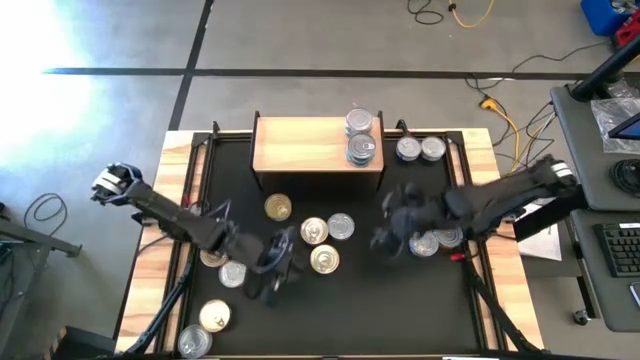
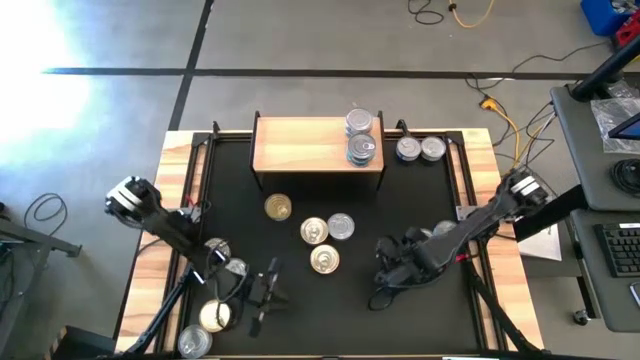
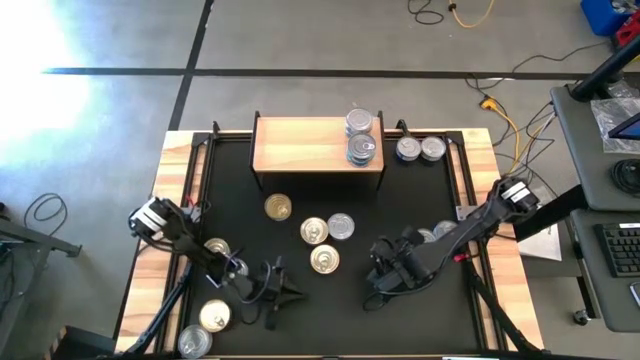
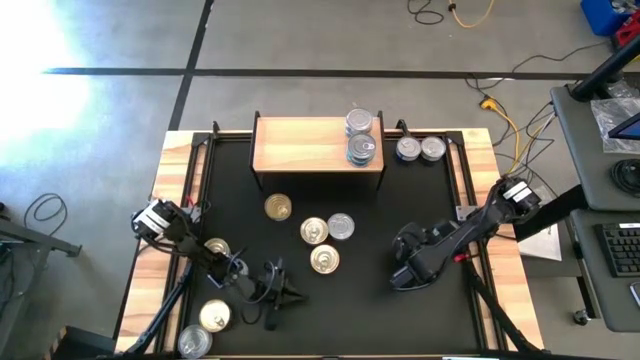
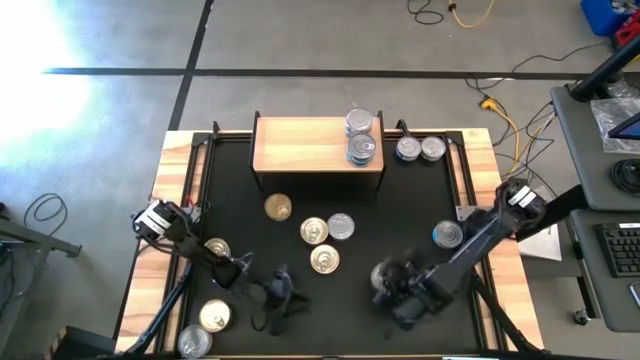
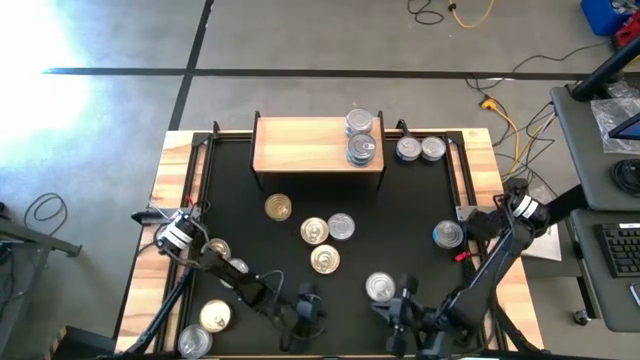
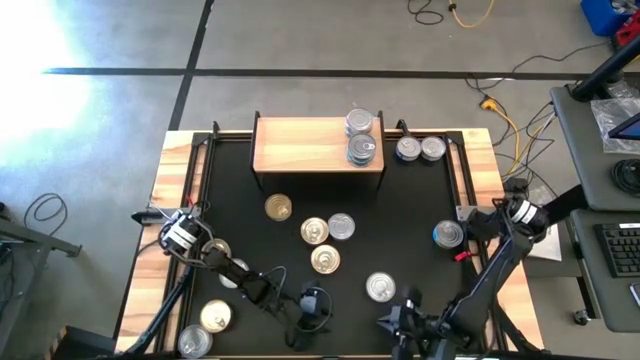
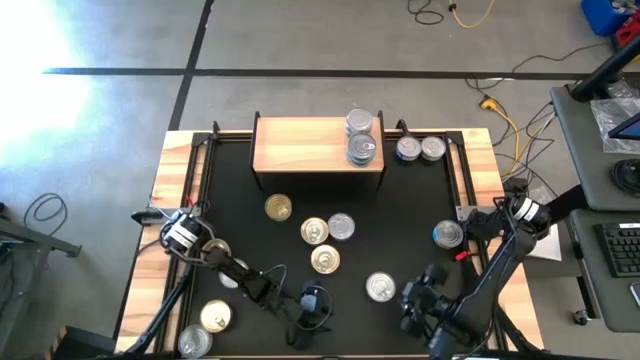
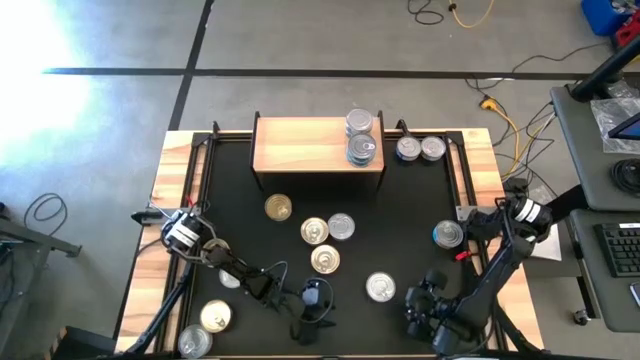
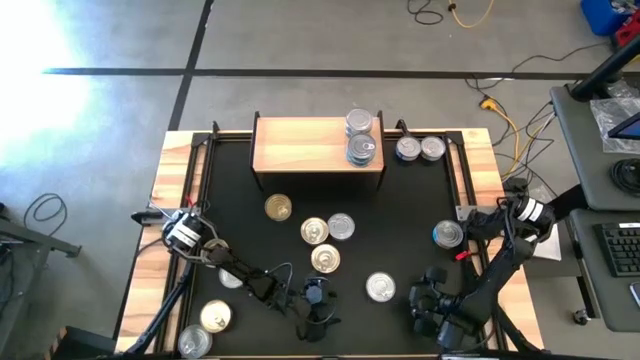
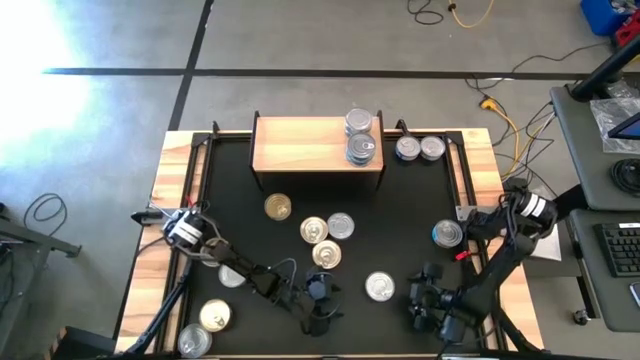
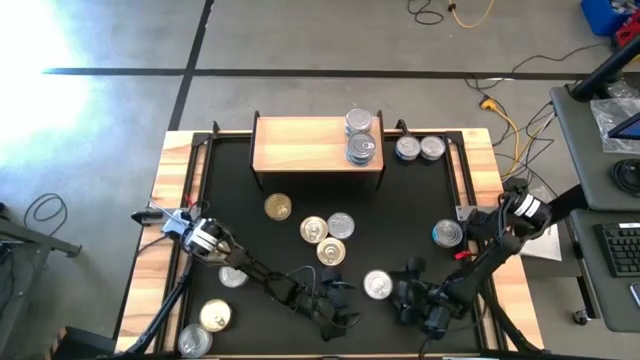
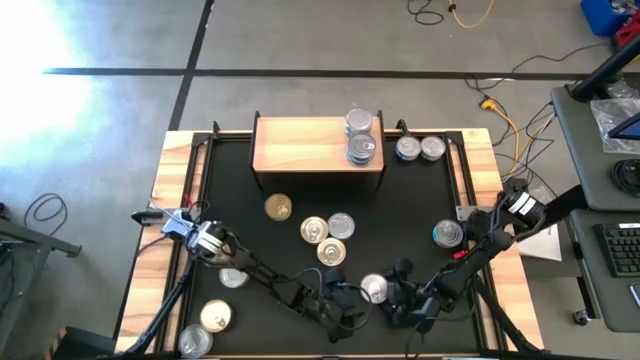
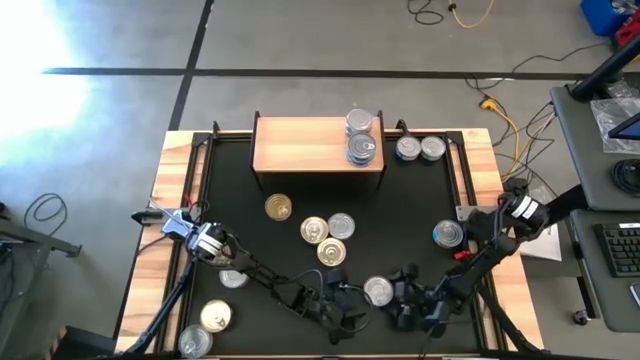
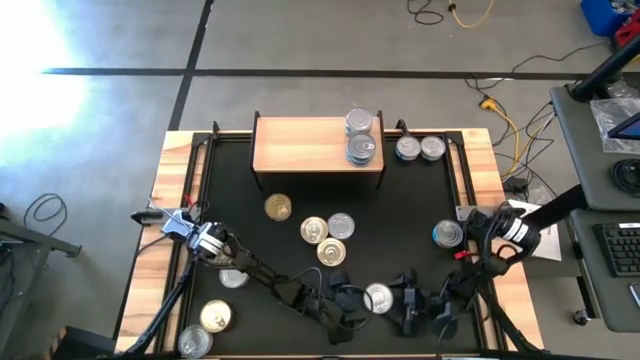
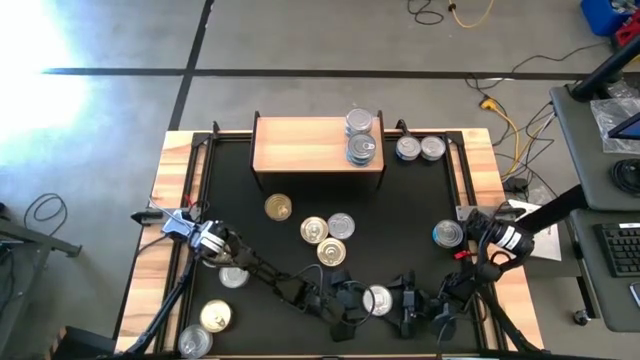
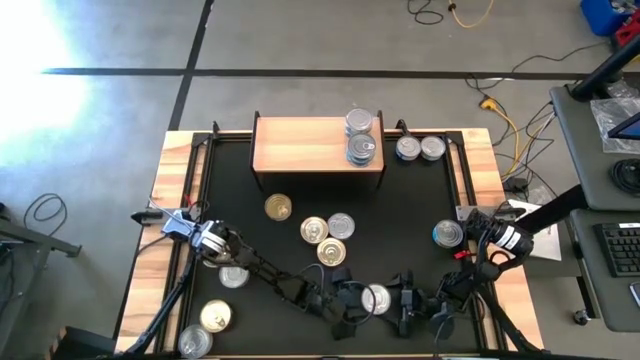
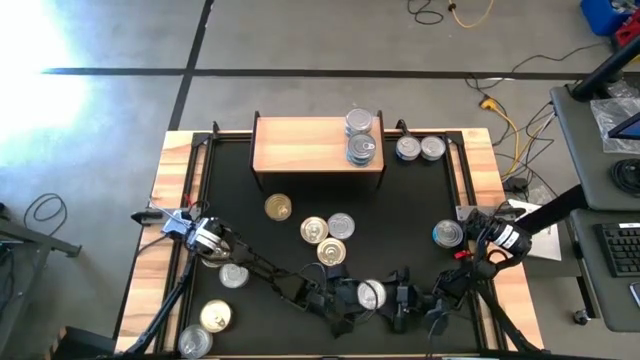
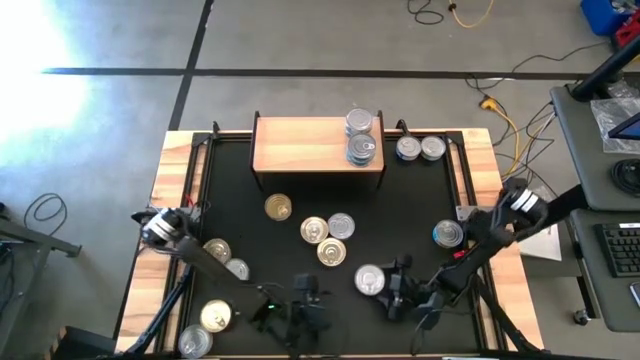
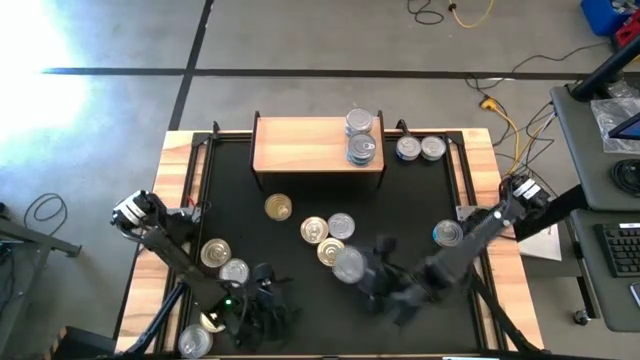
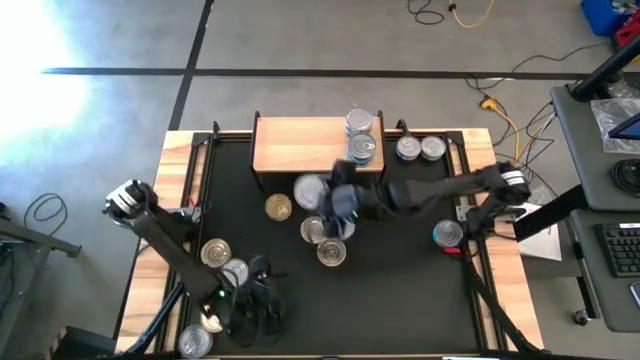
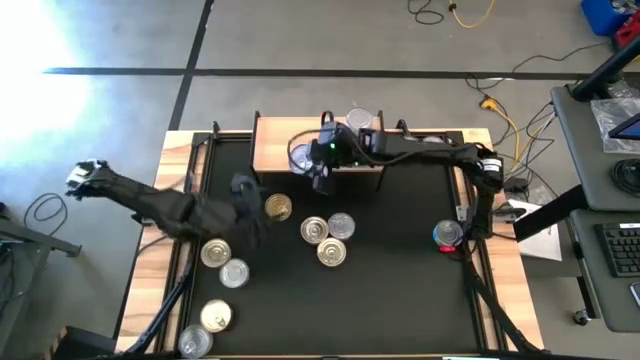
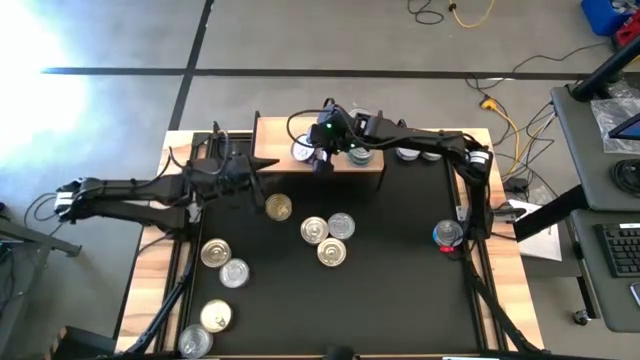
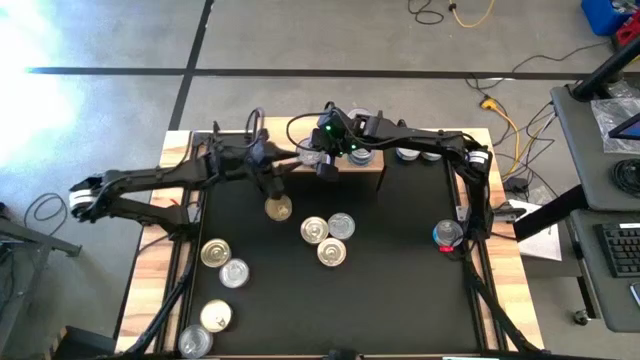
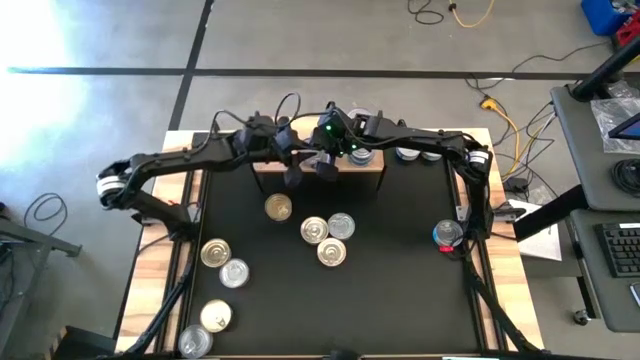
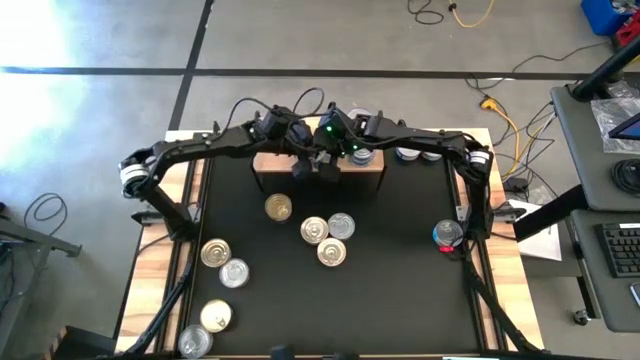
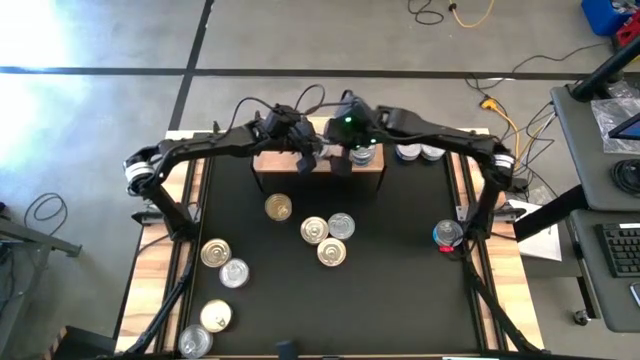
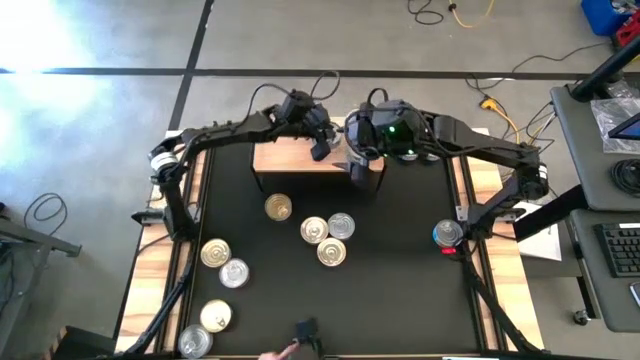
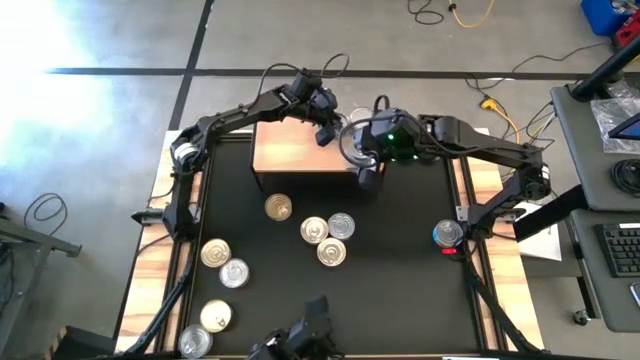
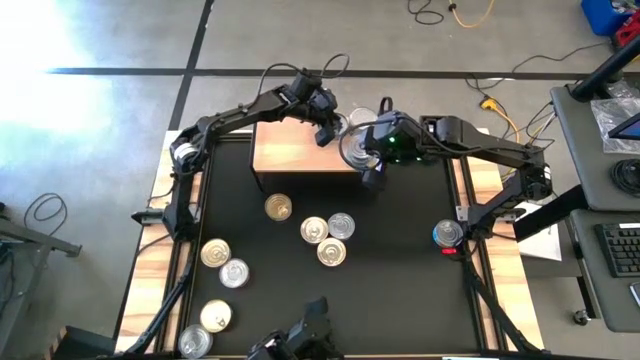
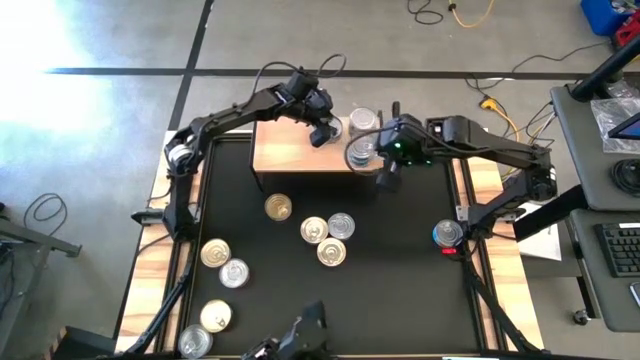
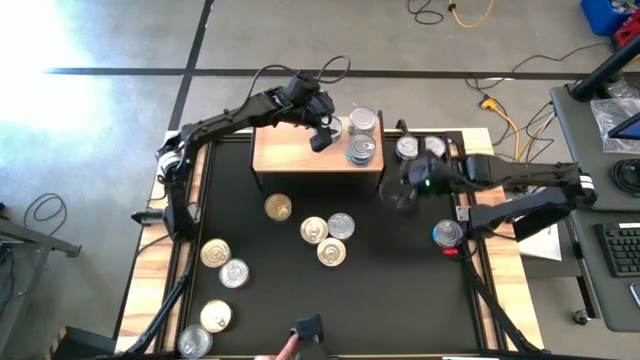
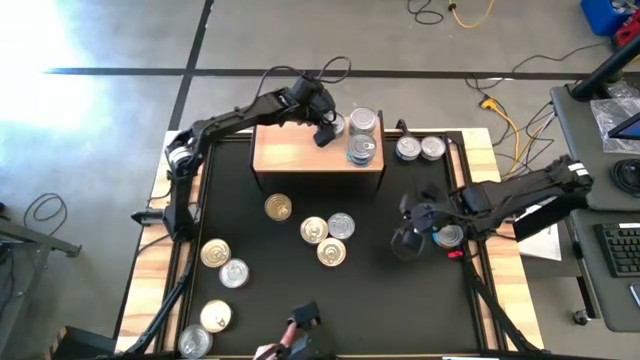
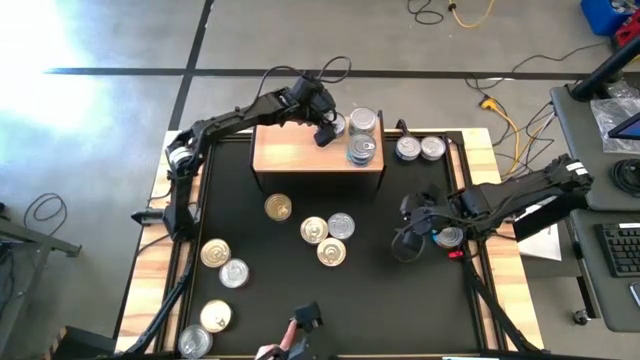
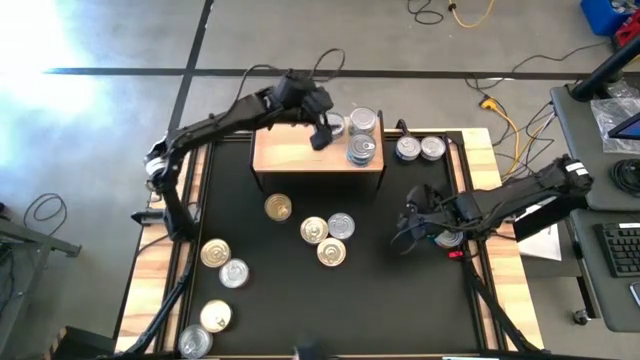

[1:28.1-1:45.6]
Task: Stack canned seafood by type on shelf
Put the bottom blue tuna can on the shelf

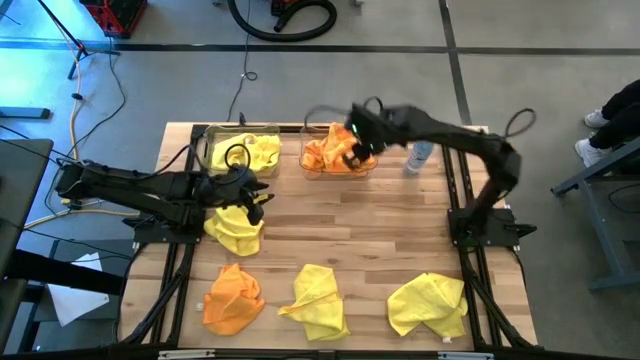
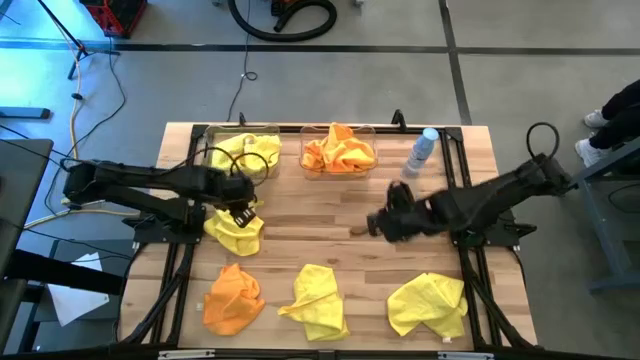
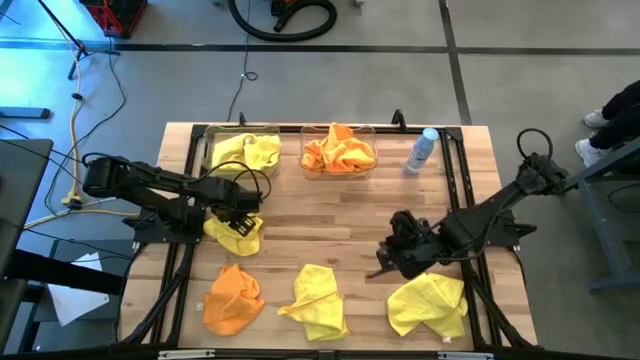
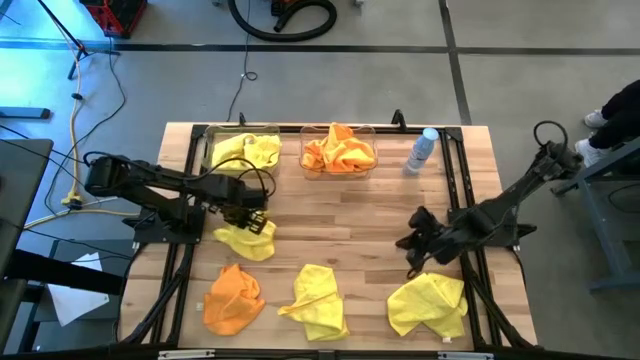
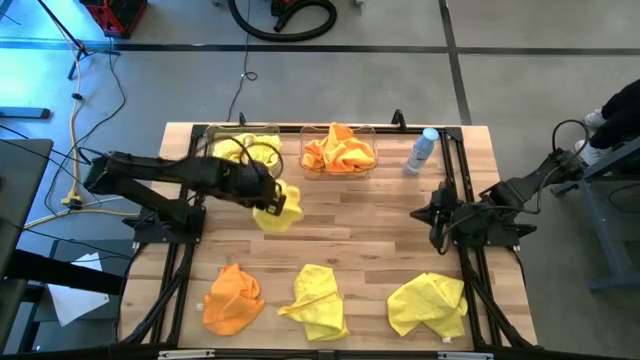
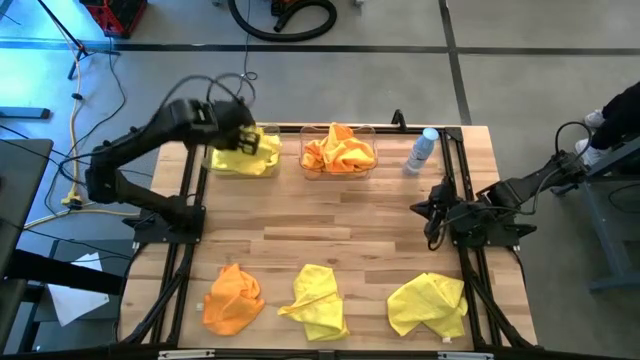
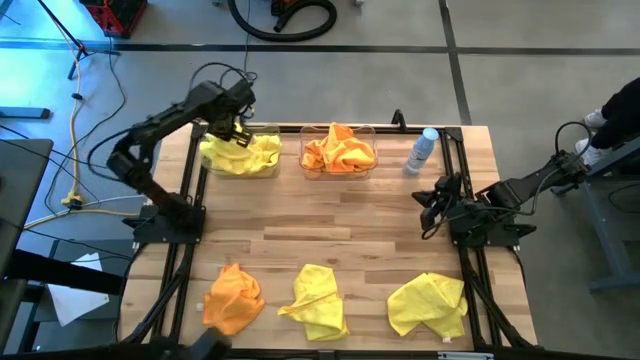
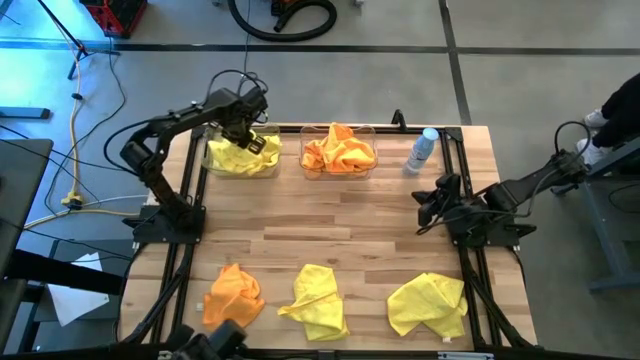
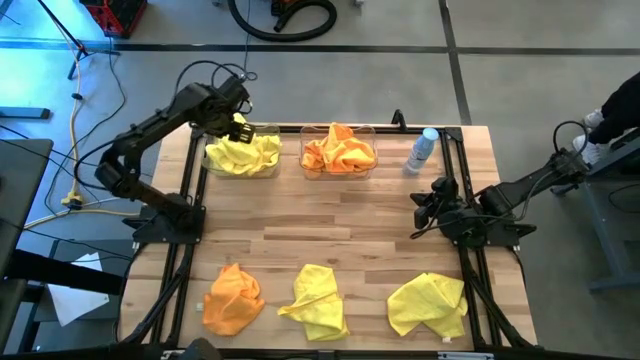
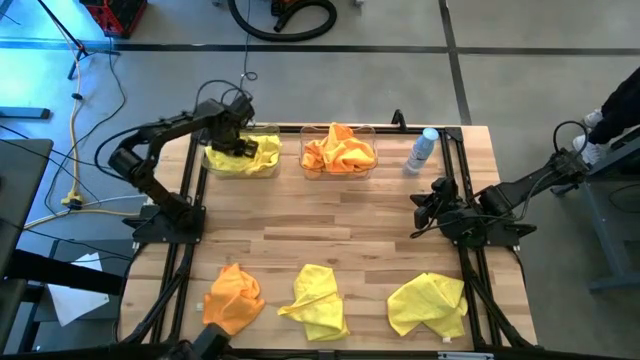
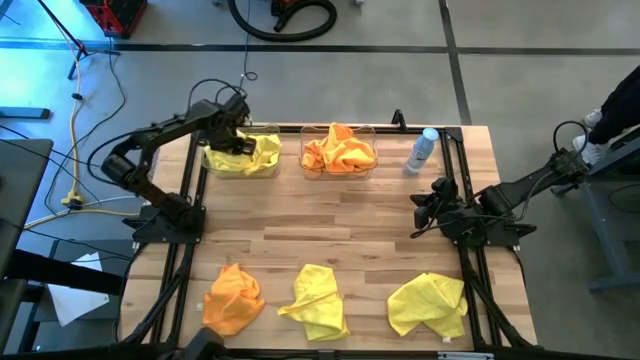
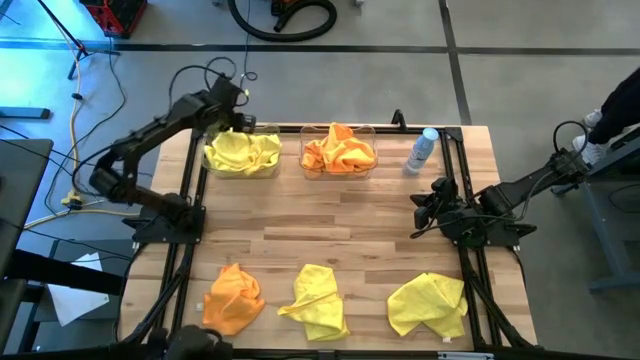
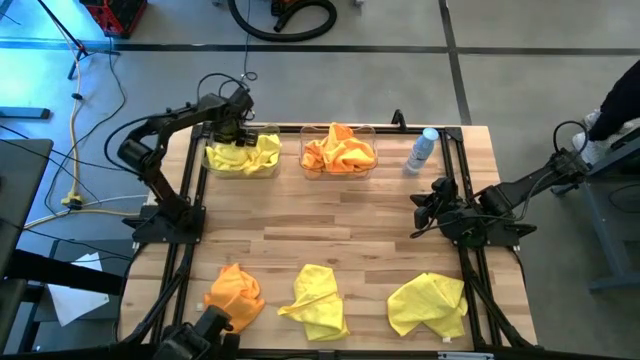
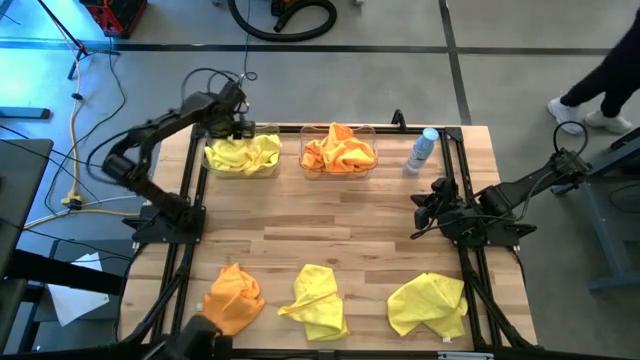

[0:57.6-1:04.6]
Task: Sort microfiber towel by color & place in baskets
Put the yellow microfiber towel into the left transparent bin
